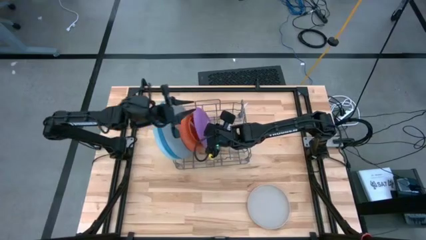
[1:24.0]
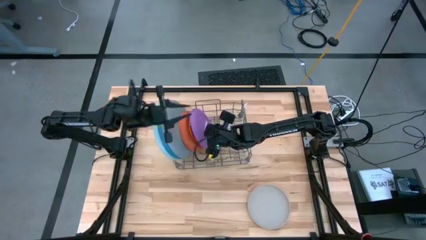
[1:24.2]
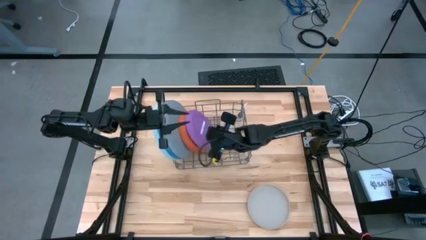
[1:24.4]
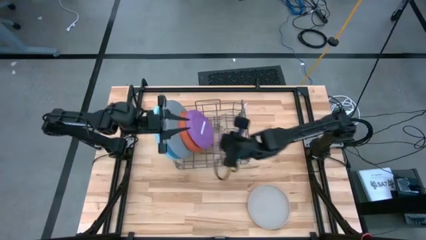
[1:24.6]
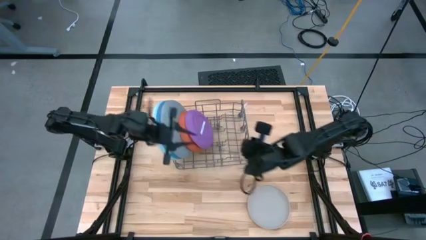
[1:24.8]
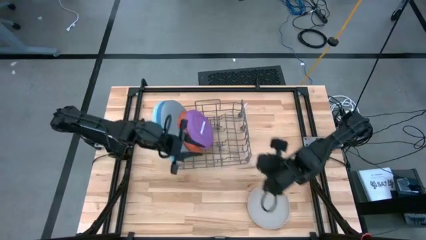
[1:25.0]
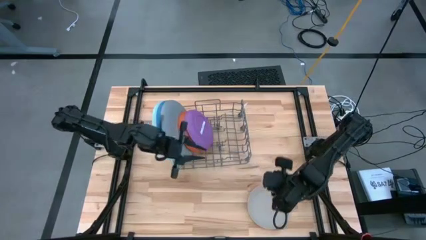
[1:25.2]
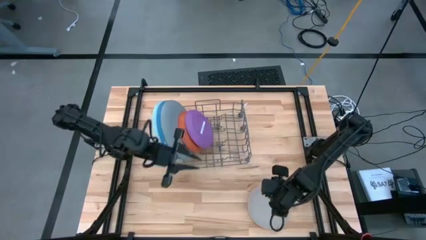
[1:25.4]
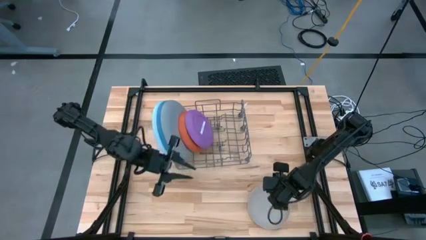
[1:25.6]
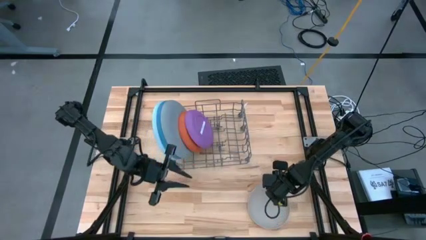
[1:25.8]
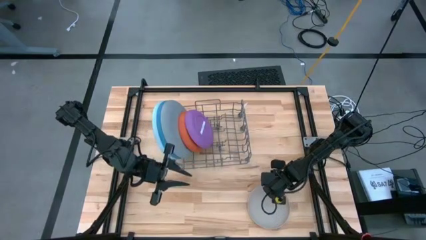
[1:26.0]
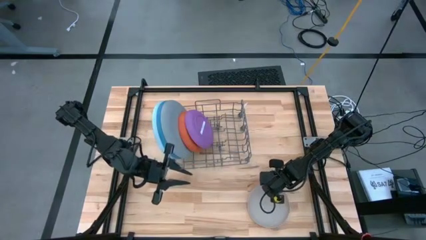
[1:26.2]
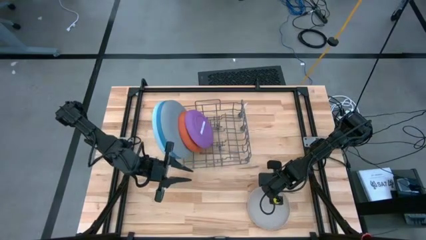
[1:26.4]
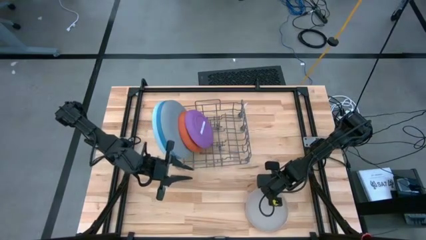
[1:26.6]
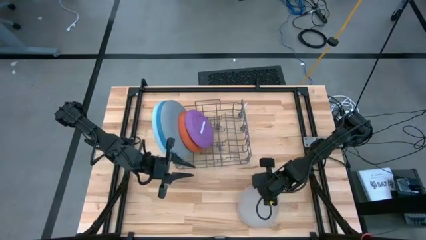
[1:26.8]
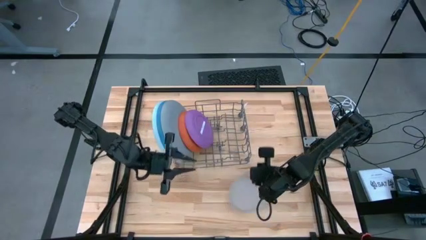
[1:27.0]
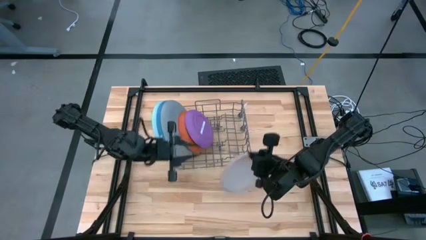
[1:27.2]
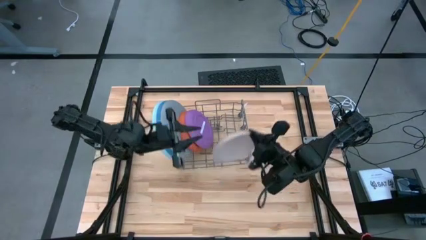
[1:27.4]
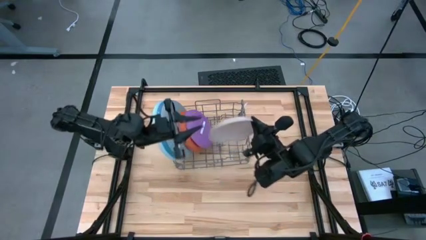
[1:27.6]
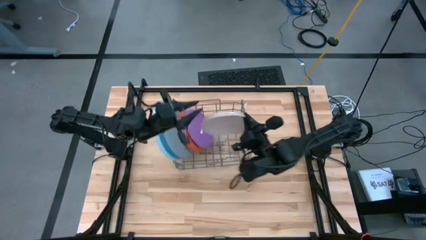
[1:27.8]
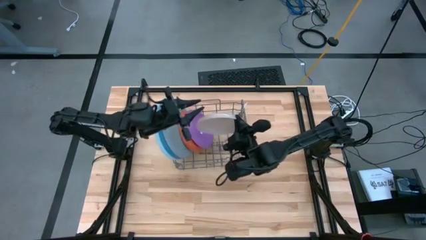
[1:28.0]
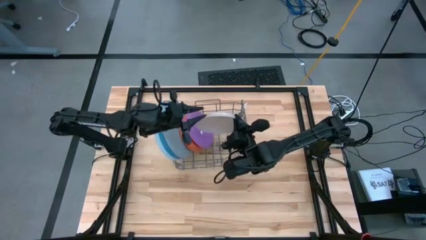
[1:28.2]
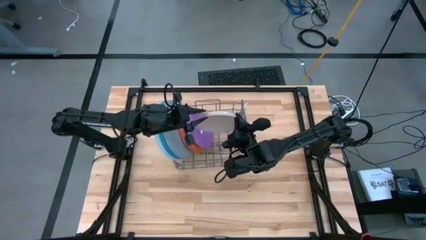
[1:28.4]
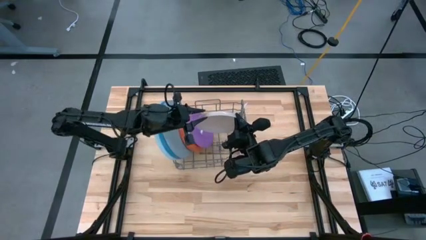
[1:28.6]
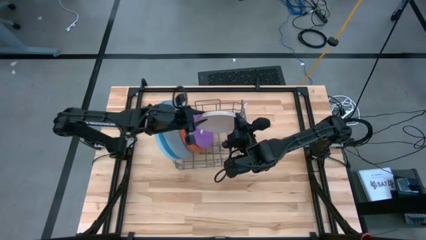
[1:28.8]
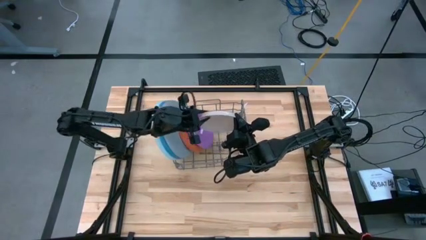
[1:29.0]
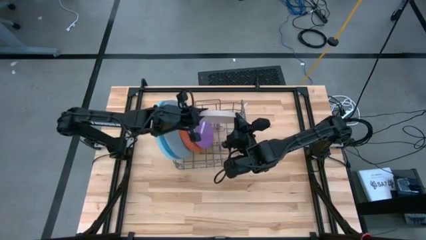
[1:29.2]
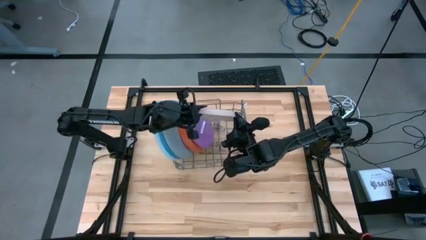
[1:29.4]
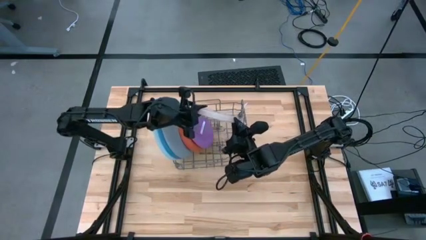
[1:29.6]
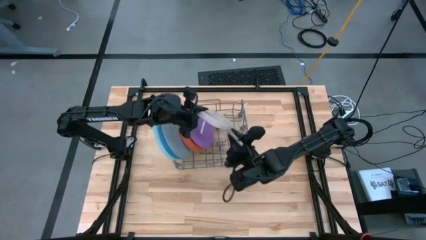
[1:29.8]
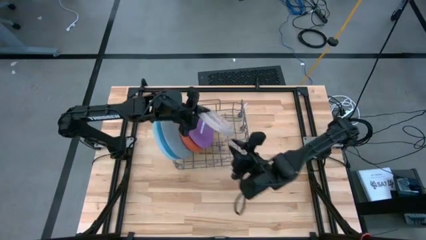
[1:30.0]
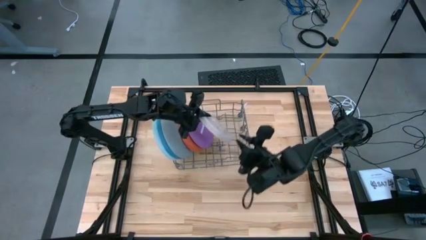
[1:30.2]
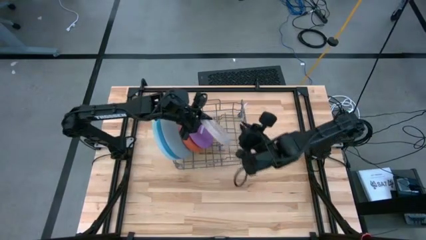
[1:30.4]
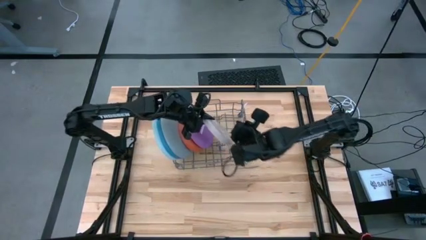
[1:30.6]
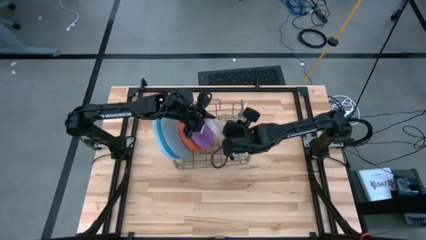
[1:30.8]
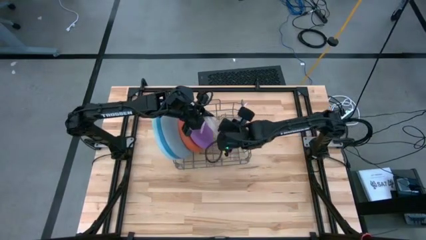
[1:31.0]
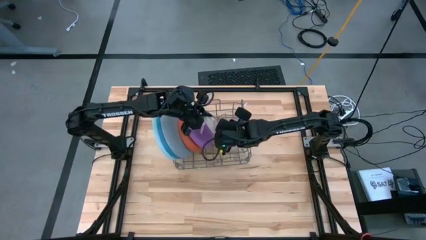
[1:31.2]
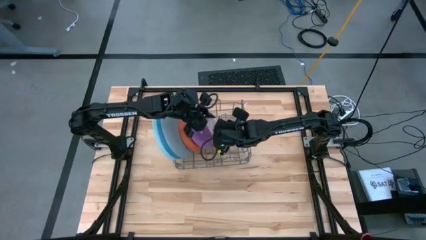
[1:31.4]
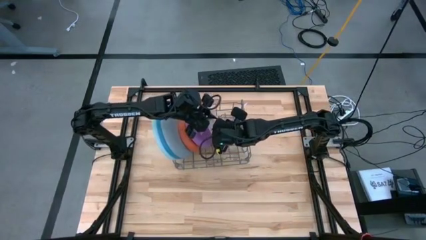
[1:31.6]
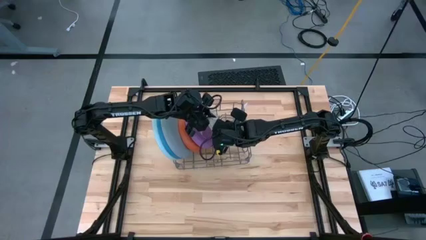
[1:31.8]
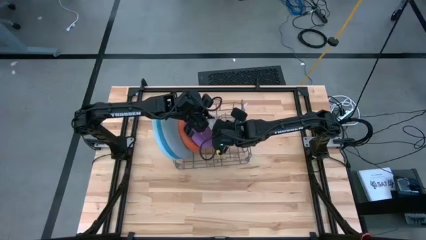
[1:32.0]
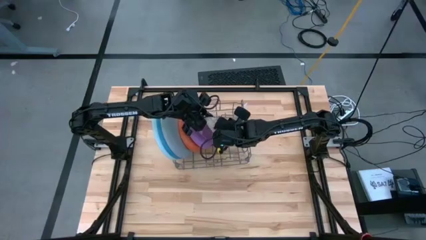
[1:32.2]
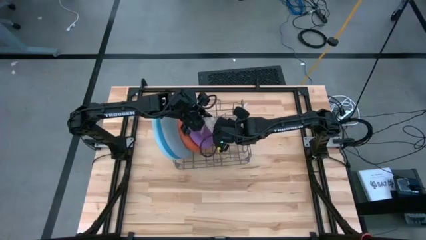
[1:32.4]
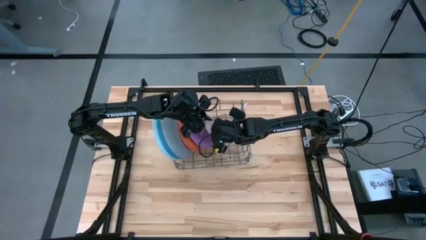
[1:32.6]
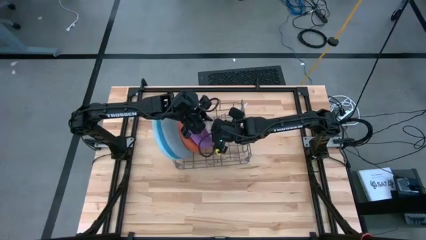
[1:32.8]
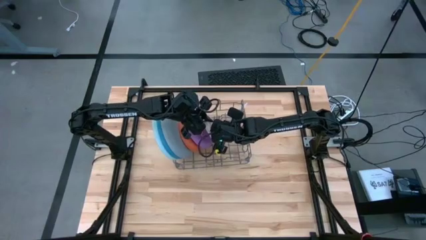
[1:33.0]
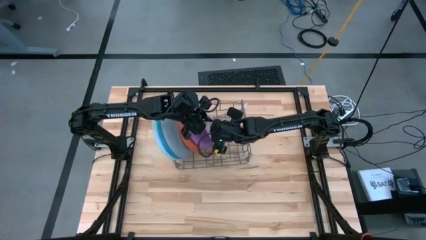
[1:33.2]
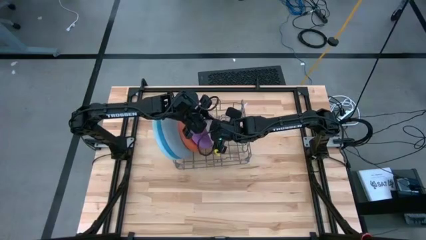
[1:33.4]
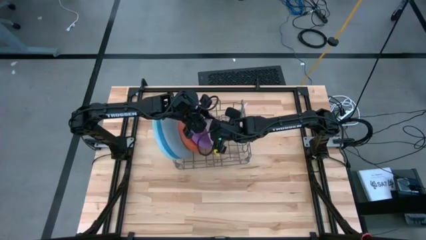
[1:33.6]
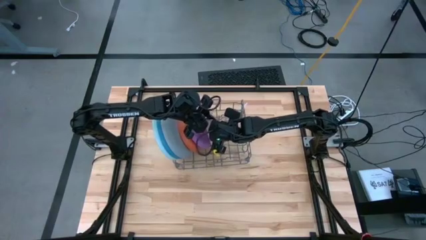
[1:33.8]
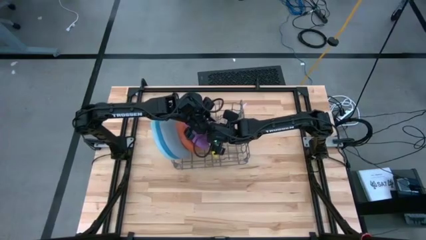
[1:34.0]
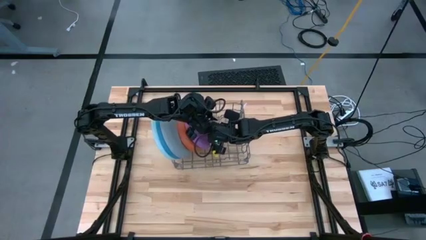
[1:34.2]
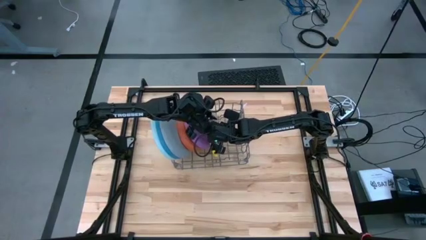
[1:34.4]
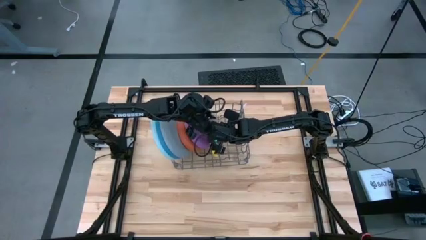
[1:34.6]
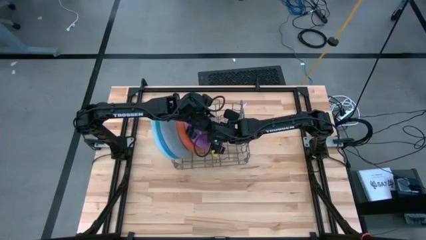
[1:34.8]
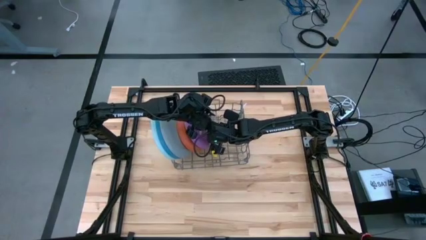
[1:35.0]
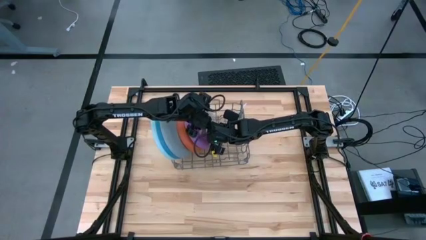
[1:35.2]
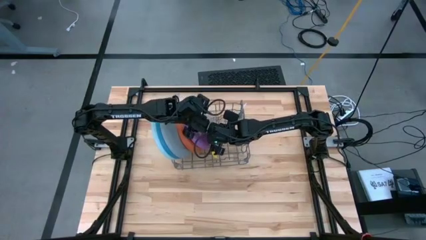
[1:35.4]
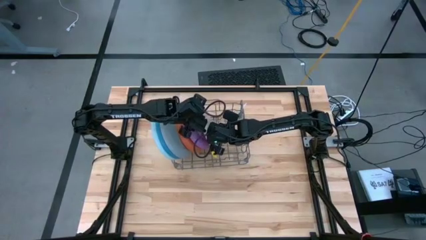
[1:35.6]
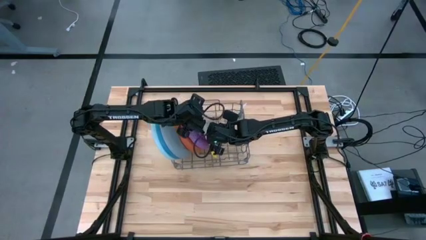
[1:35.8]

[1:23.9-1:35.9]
Task: Sort dishes
Put the white plate in the dish rack
